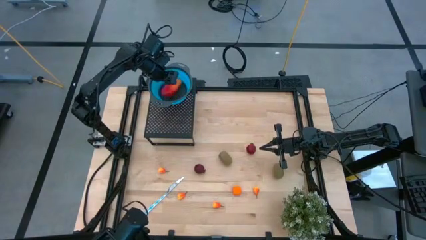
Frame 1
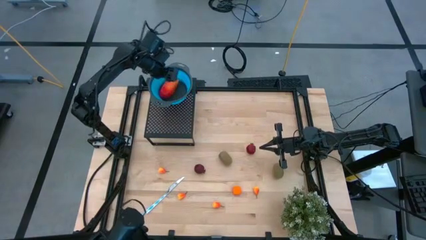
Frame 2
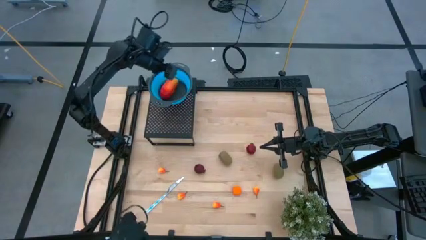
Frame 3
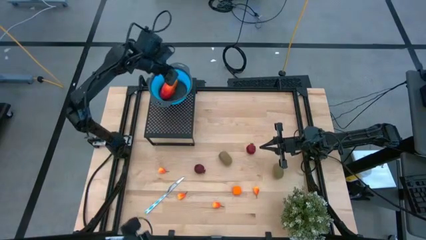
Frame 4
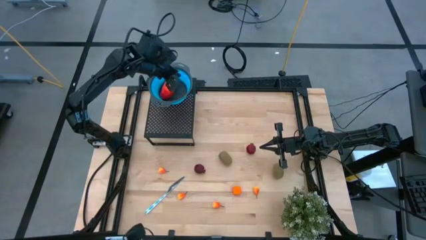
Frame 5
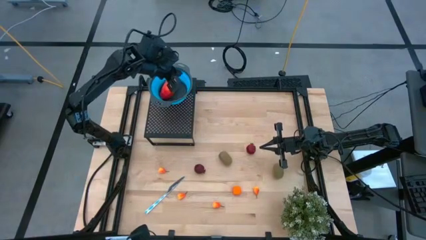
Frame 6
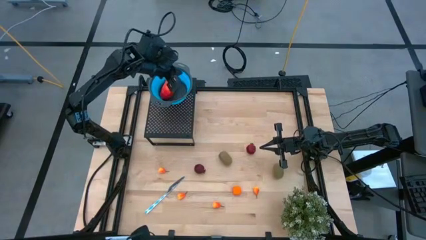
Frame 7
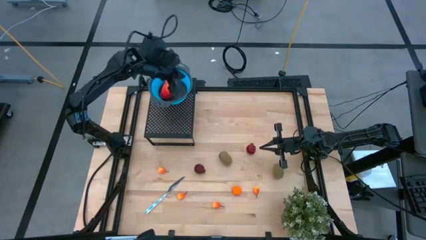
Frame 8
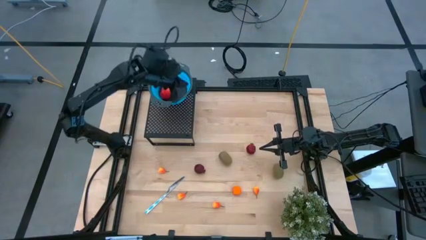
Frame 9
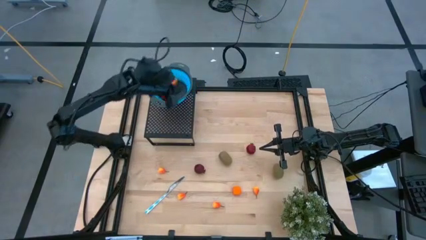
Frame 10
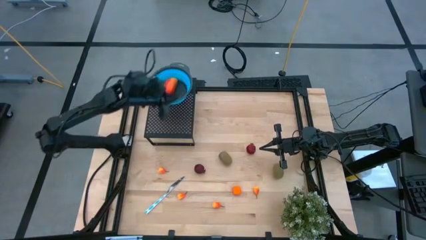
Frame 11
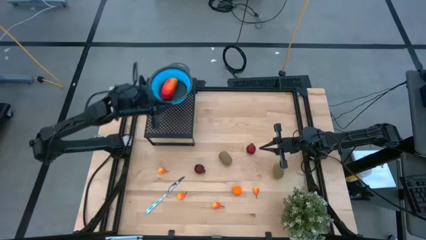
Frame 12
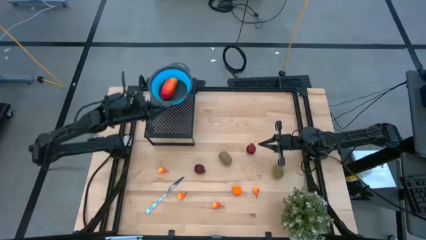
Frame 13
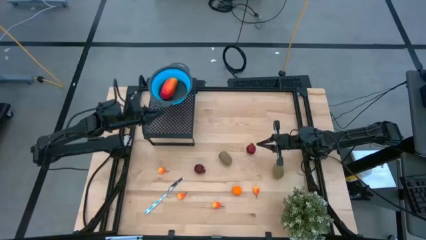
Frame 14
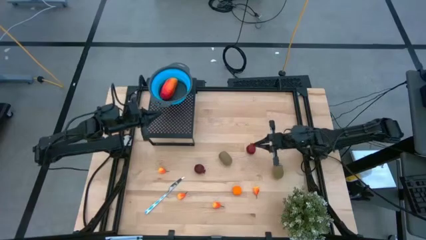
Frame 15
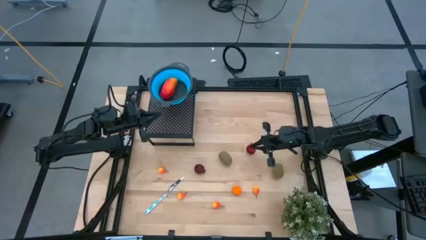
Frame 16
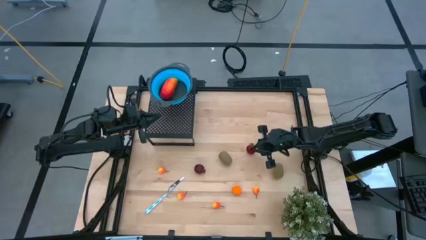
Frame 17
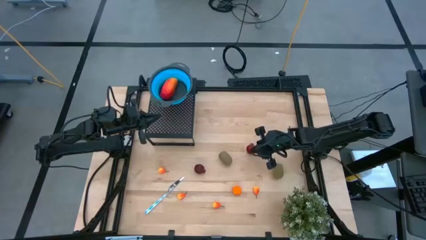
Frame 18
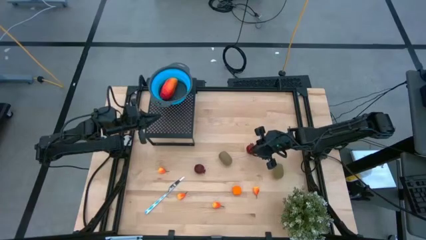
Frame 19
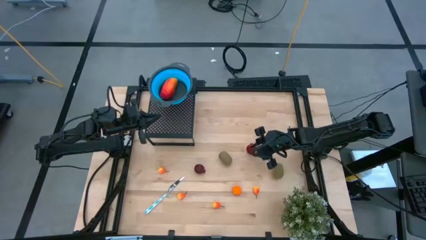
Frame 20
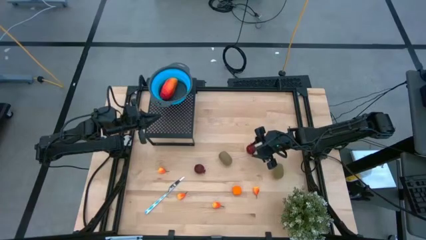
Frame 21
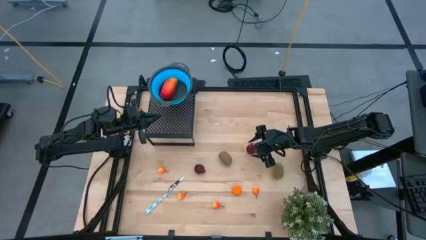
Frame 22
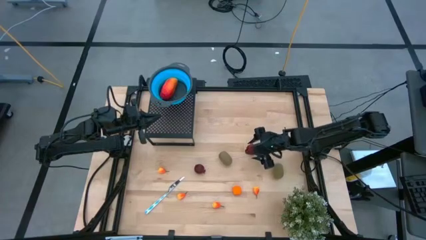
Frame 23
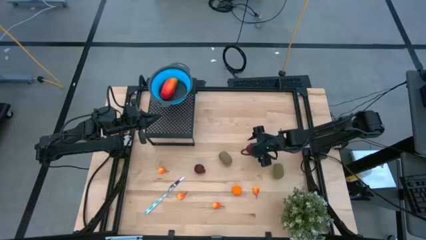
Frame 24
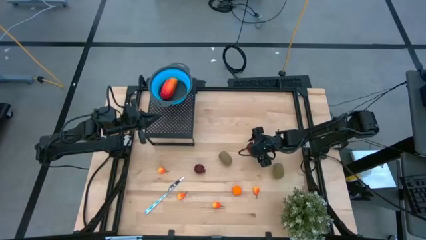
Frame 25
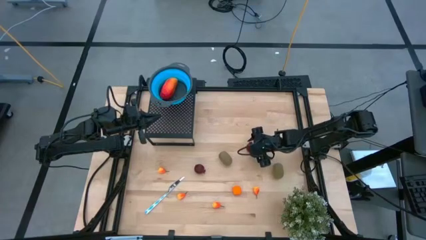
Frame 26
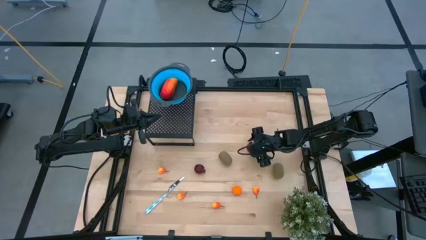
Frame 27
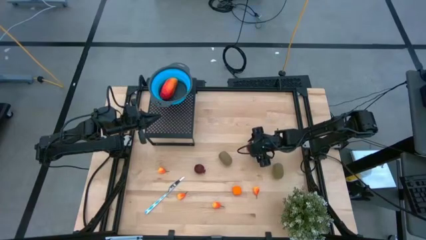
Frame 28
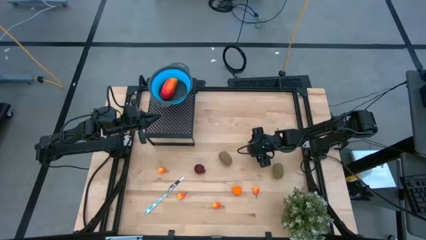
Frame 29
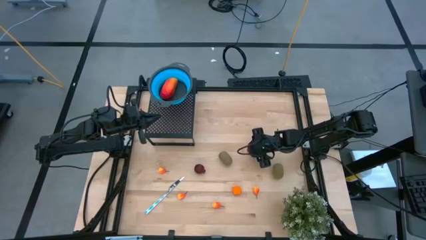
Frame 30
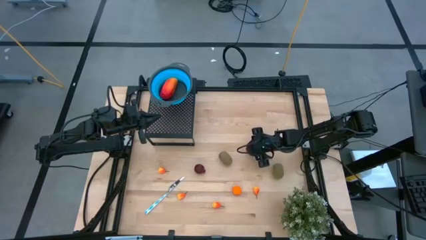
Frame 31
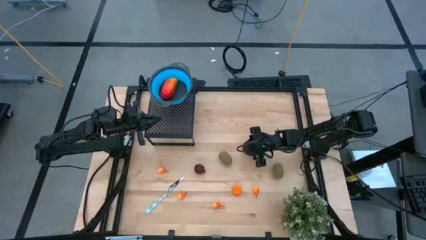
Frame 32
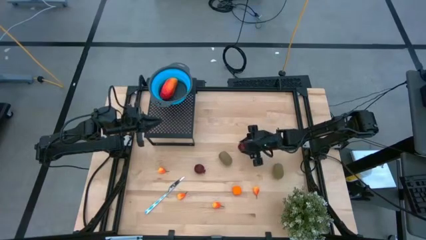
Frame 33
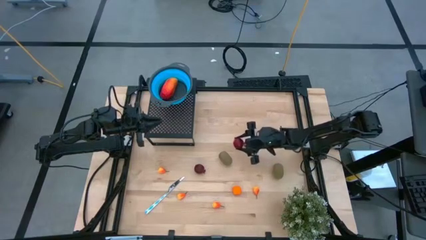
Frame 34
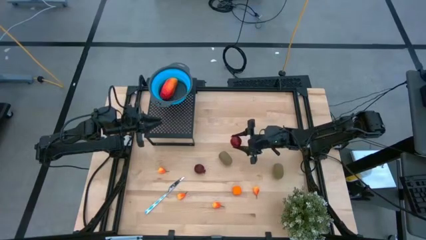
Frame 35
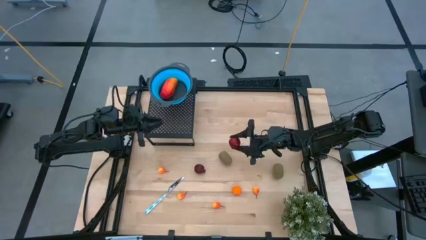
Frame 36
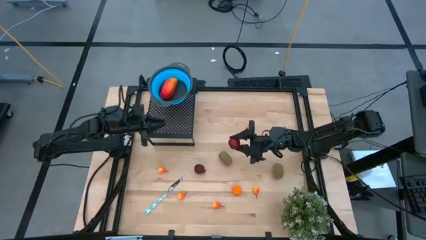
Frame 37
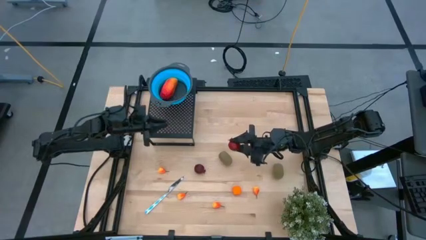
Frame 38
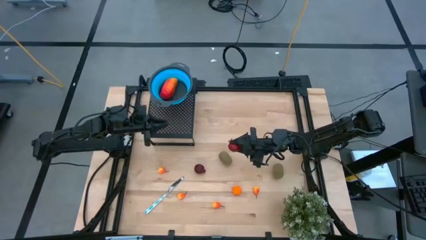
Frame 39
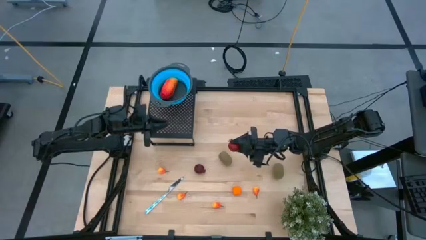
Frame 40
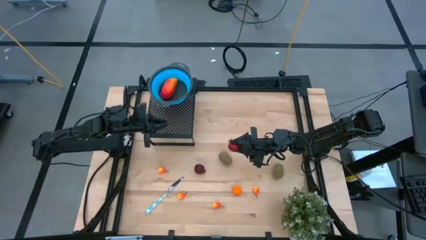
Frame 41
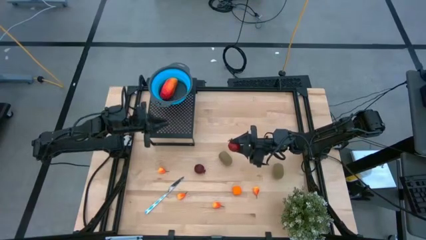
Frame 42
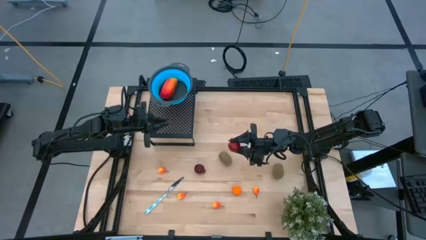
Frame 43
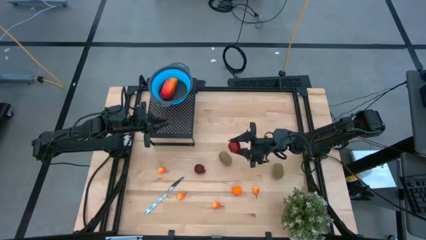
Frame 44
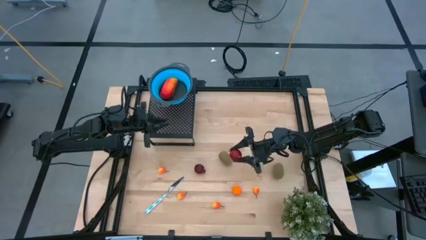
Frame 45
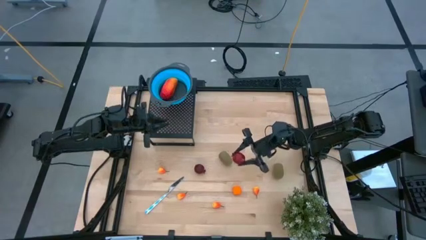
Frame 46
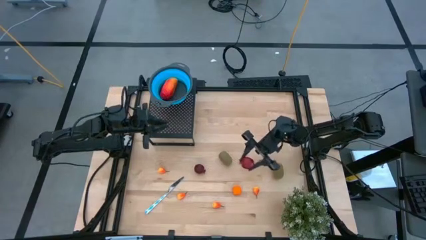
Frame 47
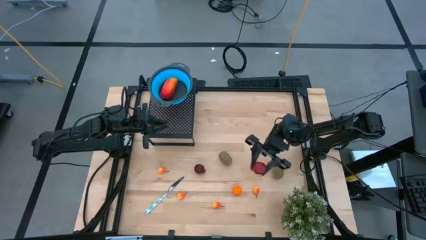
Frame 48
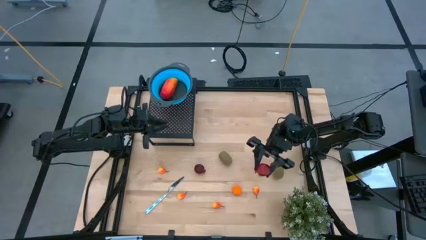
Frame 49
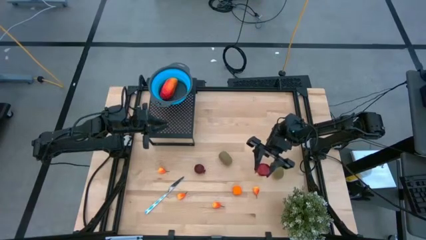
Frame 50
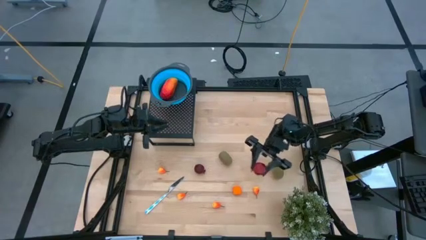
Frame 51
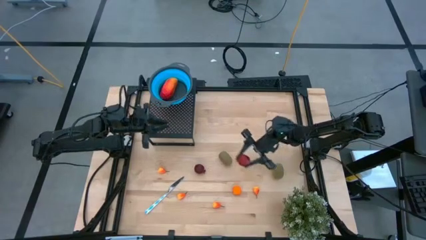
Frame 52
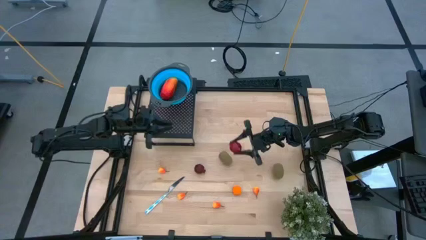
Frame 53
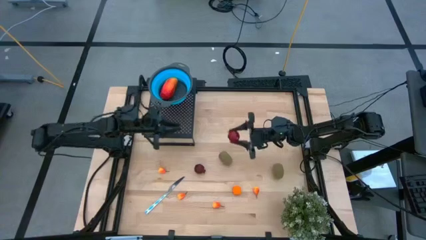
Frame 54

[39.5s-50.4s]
Task: Pick & Place Fruit
Put the right pomegranate into the blue strainer bowl on the shelf

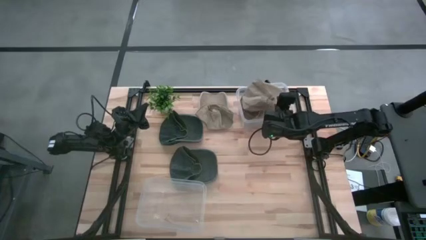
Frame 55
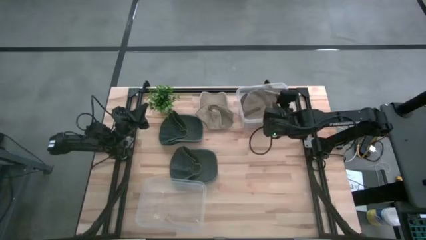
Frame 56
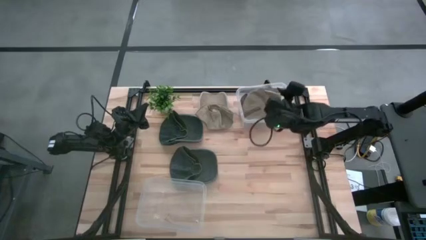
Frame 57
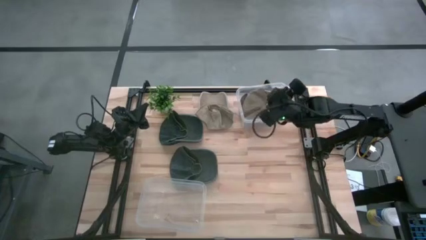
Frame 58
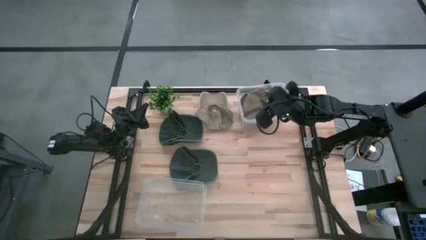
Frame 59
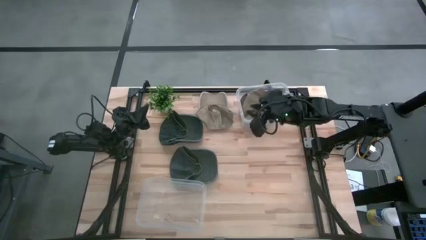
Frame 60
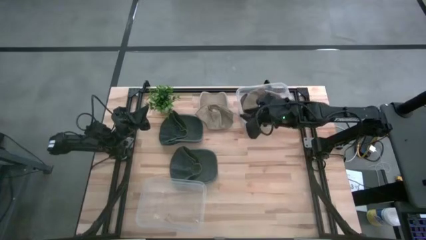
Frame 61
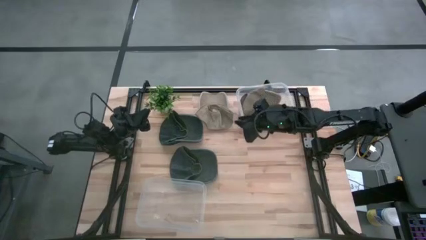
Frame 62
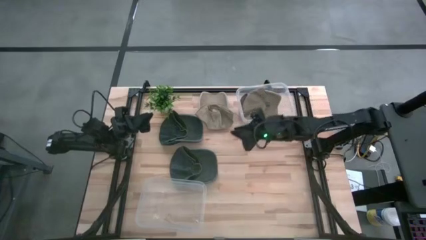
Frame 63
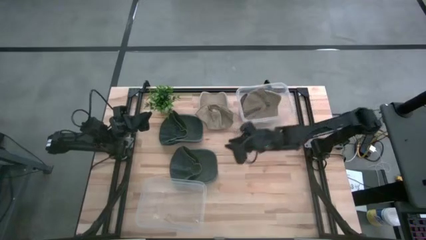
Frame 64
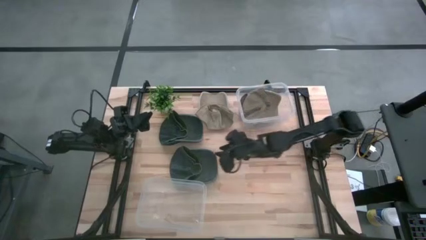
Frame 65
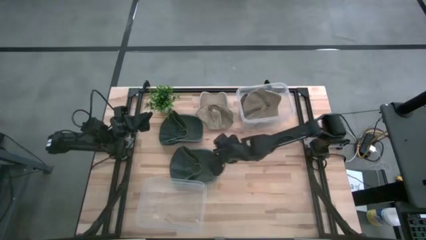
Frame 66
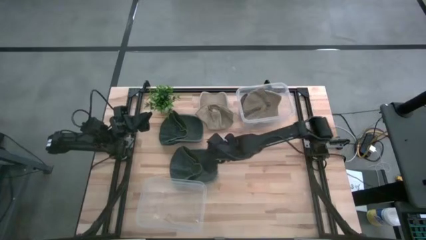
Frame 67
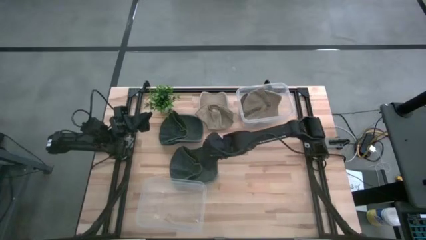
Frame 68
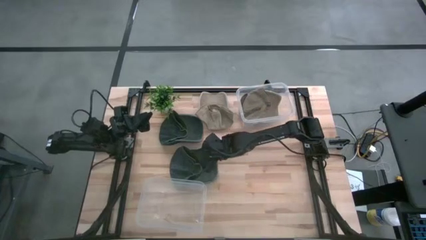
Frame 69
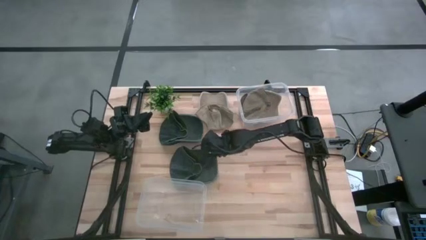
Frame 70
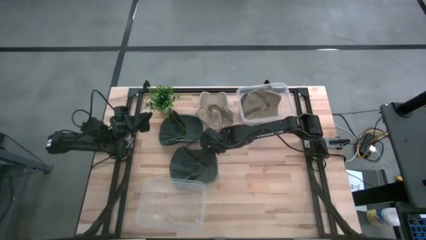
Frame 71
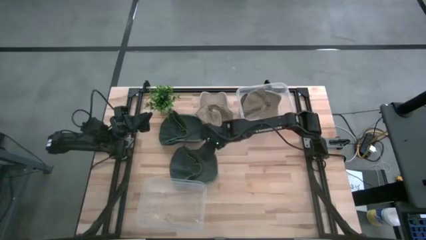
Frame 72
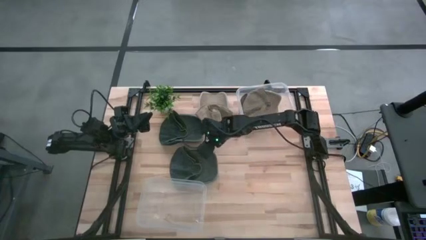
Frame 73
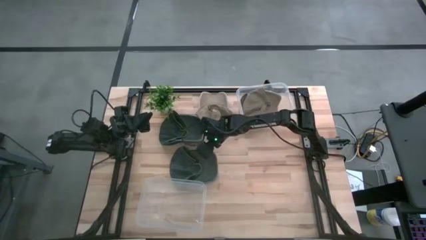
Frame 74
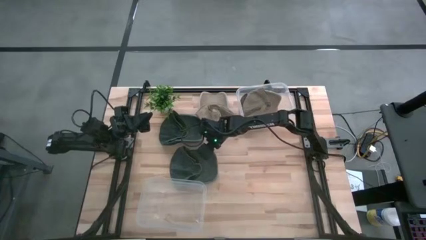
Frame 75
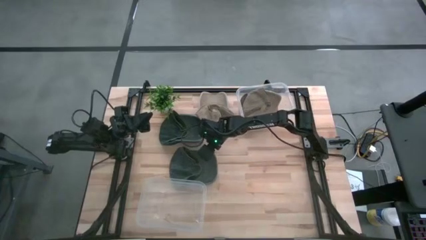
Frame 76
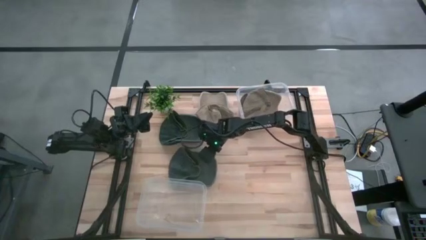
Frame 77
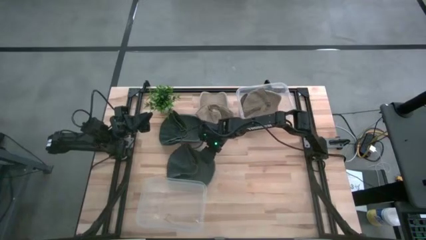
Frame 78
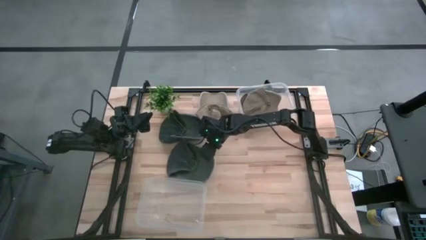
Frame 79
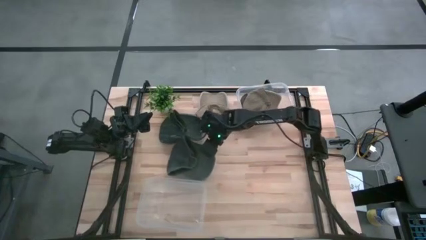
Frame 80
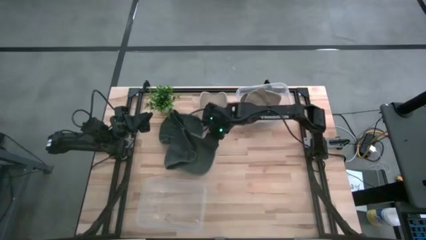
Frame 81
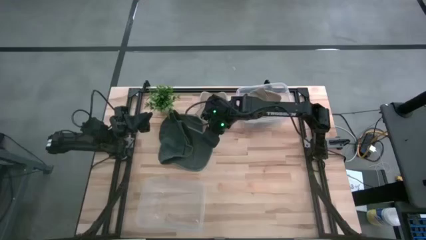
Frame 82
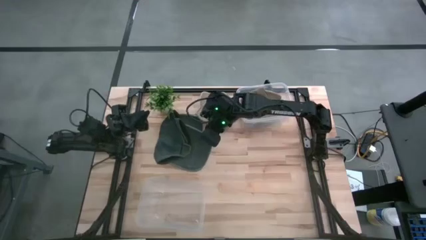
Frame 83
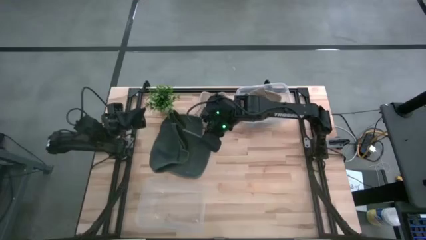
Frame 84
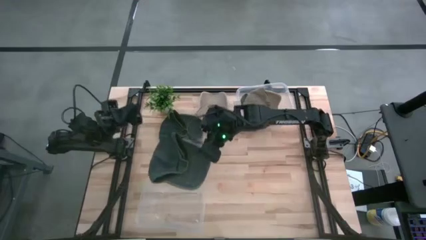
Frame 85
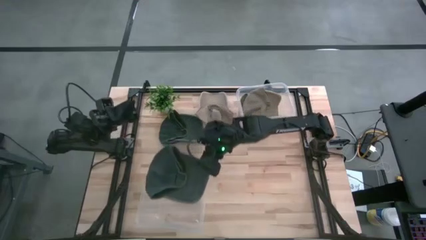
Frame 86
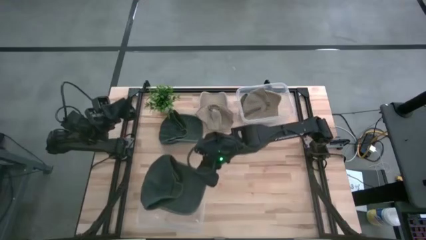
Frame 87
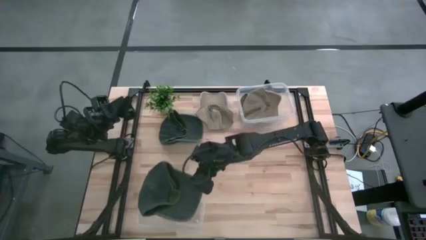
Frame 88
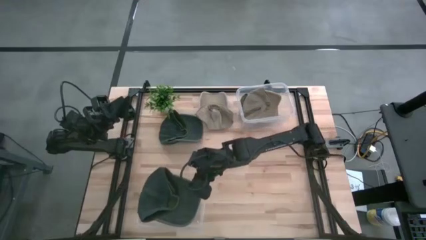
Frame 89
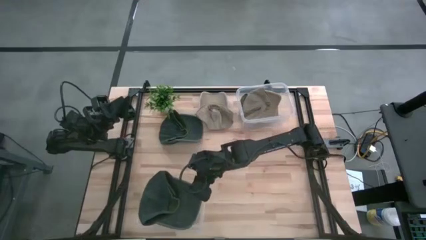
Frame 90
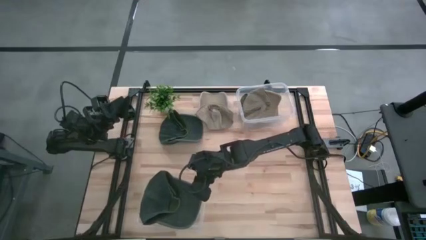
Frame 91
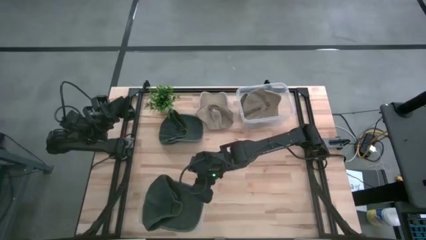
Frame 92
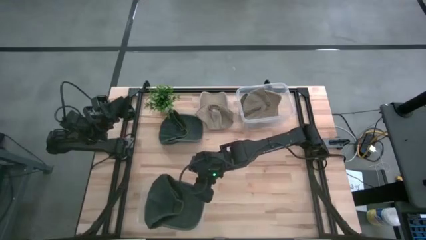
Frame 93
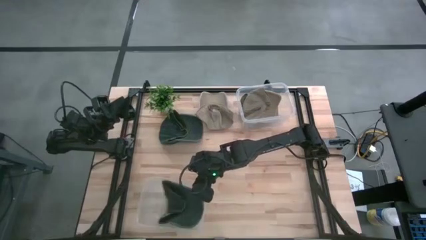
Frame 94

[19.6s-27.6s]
Task: Pick & Place hat
Put the bottom green cap into the bottom transparent bin
